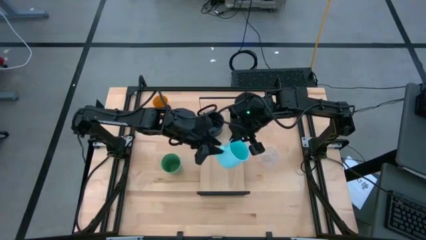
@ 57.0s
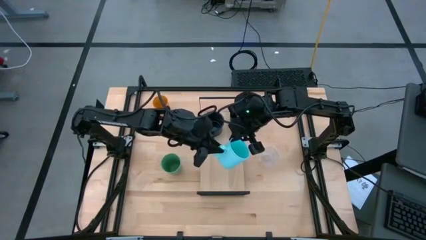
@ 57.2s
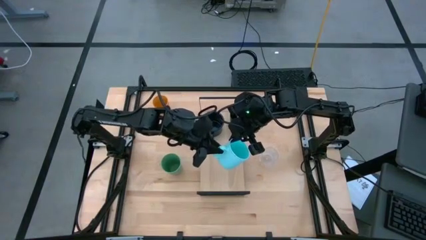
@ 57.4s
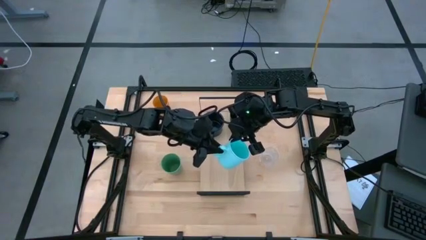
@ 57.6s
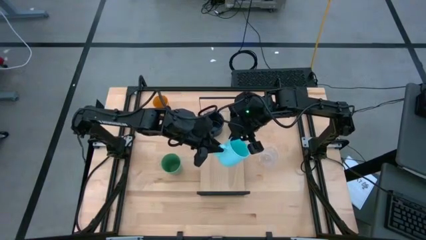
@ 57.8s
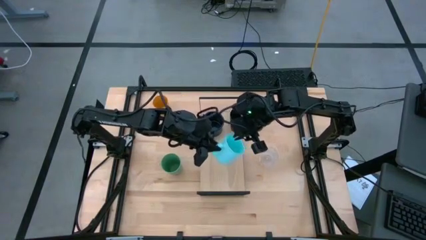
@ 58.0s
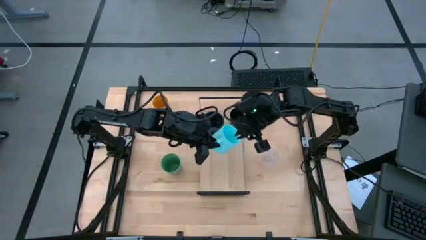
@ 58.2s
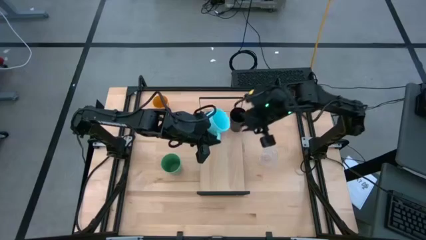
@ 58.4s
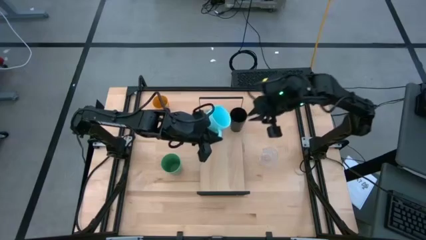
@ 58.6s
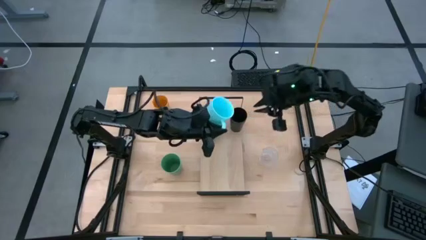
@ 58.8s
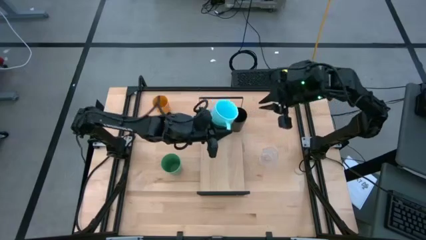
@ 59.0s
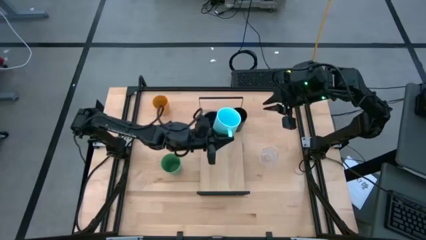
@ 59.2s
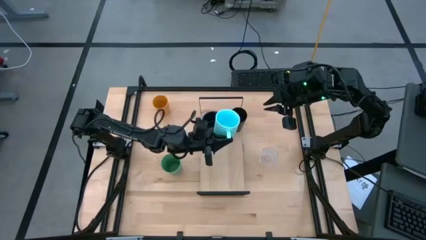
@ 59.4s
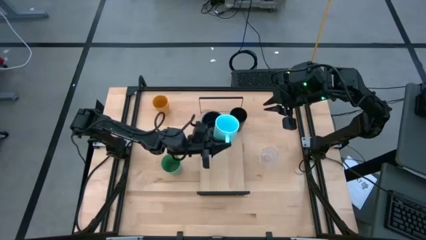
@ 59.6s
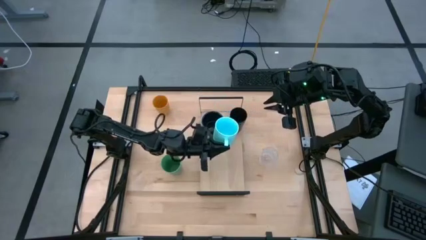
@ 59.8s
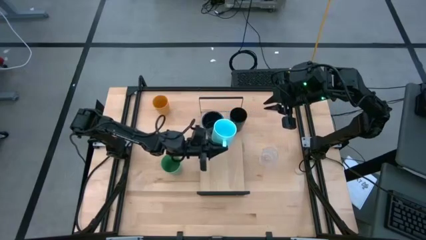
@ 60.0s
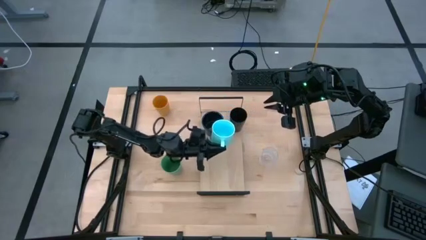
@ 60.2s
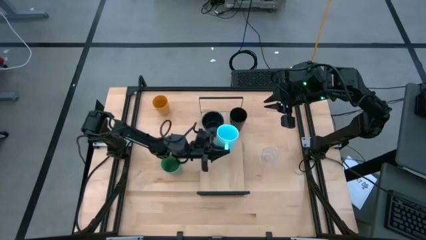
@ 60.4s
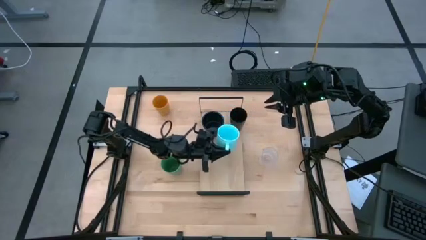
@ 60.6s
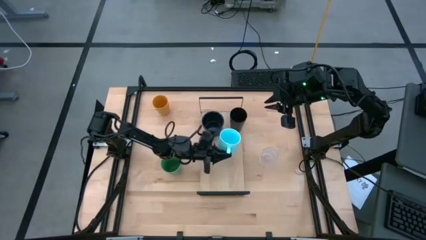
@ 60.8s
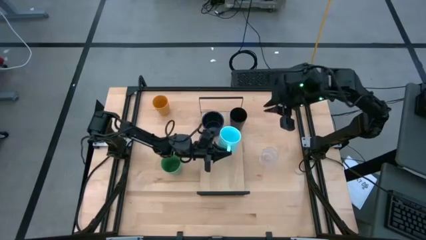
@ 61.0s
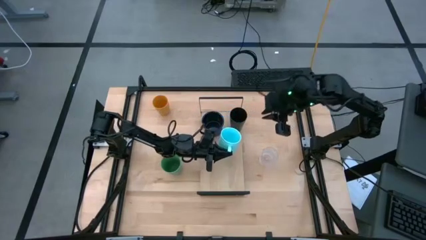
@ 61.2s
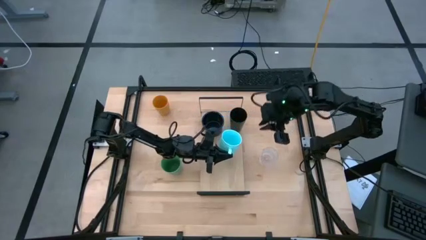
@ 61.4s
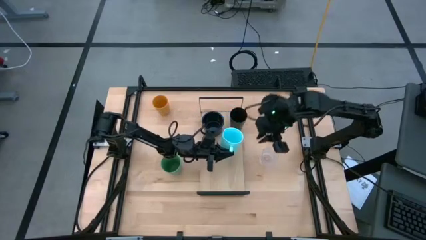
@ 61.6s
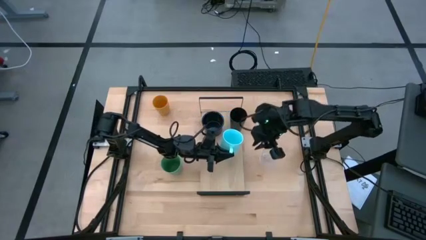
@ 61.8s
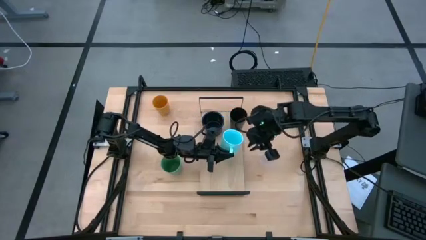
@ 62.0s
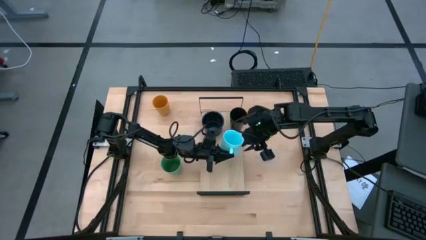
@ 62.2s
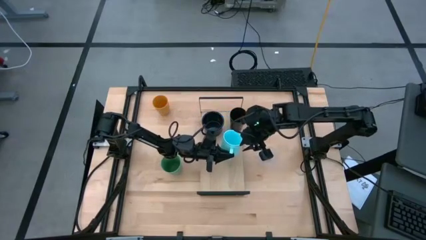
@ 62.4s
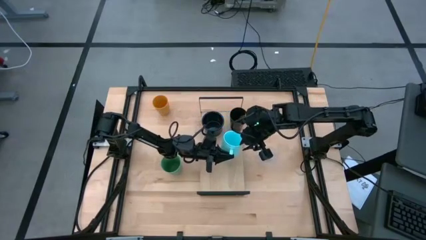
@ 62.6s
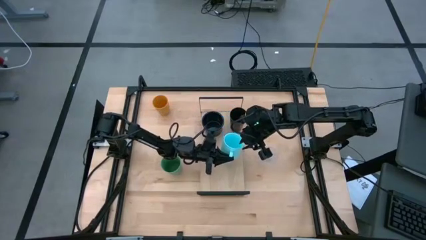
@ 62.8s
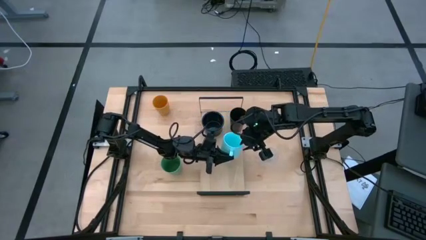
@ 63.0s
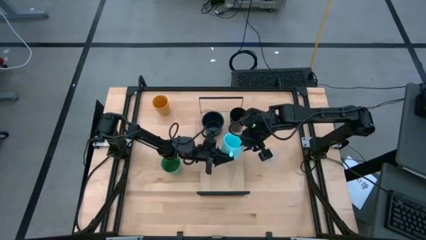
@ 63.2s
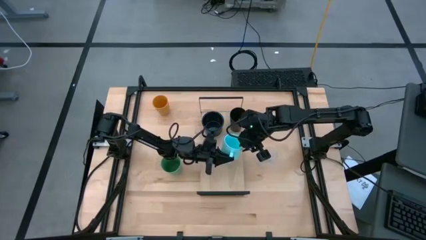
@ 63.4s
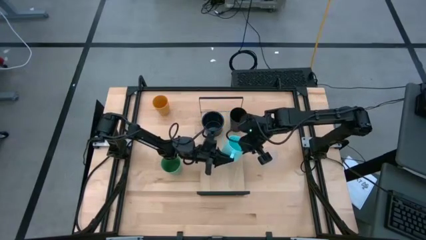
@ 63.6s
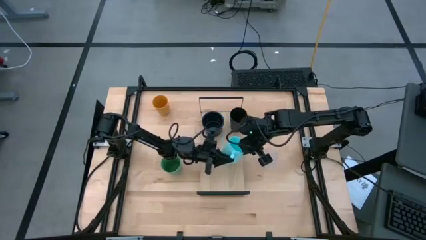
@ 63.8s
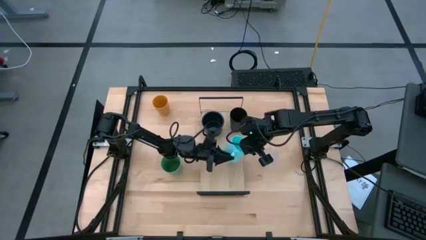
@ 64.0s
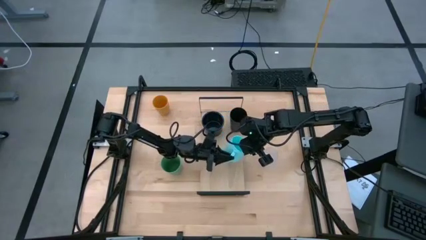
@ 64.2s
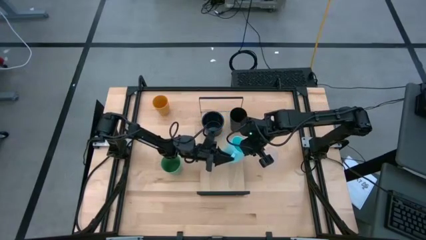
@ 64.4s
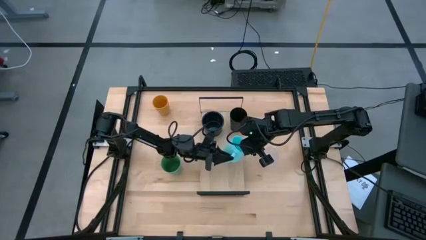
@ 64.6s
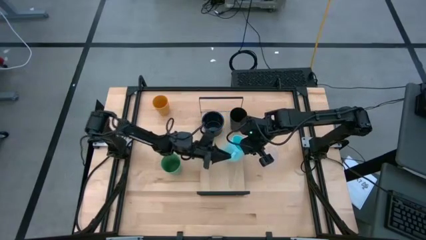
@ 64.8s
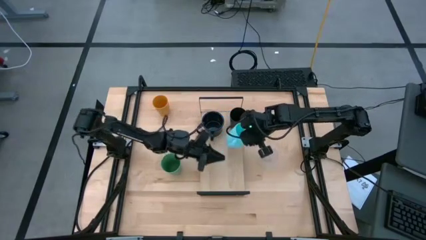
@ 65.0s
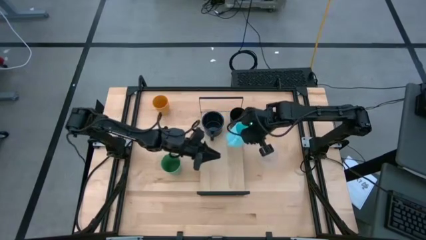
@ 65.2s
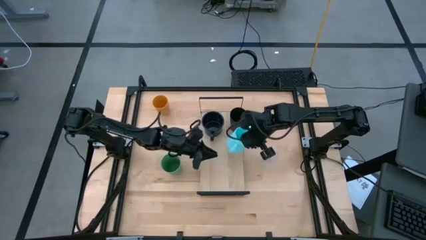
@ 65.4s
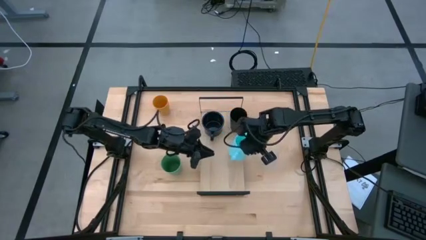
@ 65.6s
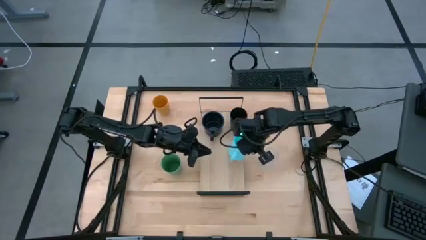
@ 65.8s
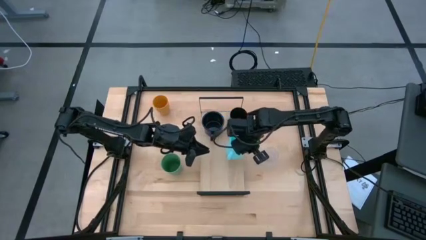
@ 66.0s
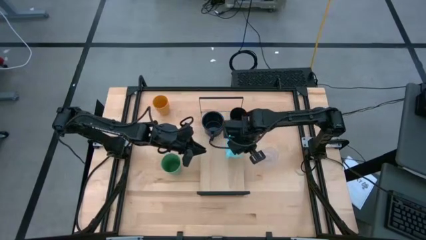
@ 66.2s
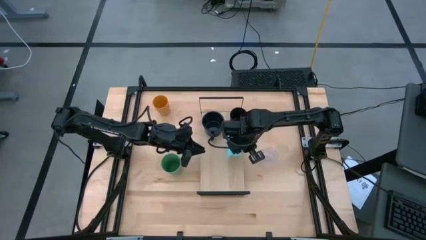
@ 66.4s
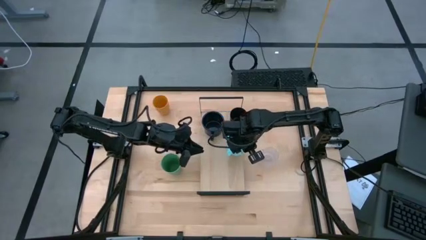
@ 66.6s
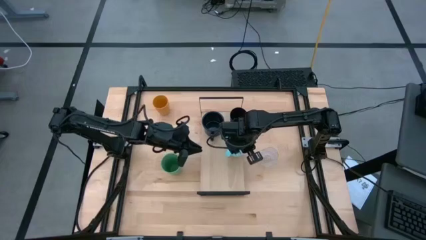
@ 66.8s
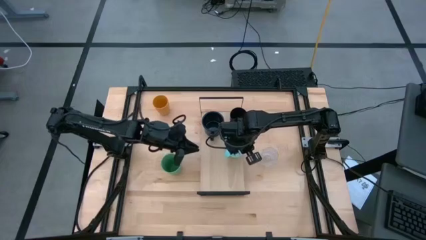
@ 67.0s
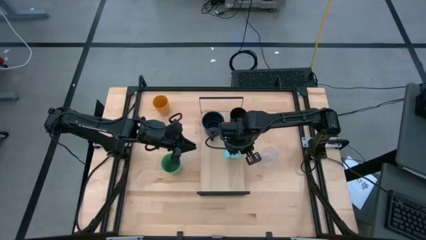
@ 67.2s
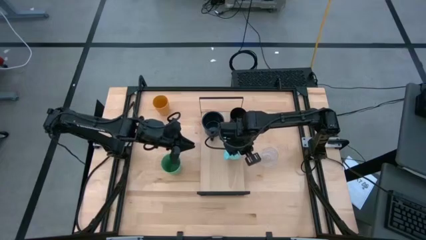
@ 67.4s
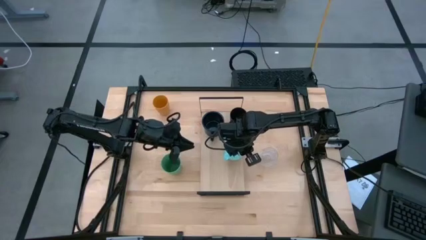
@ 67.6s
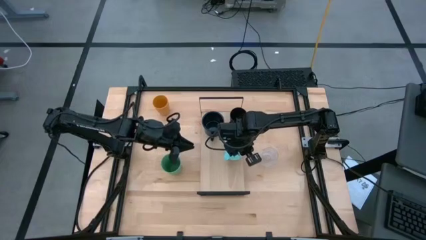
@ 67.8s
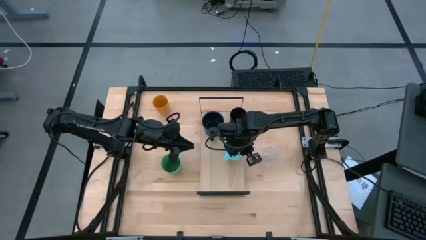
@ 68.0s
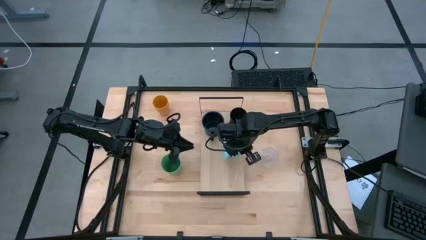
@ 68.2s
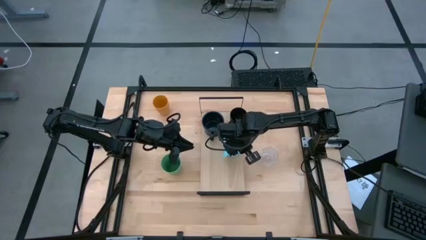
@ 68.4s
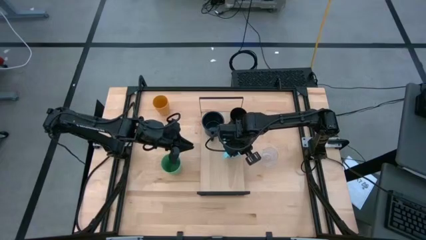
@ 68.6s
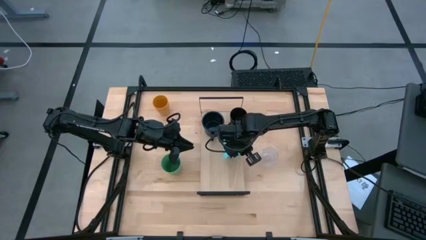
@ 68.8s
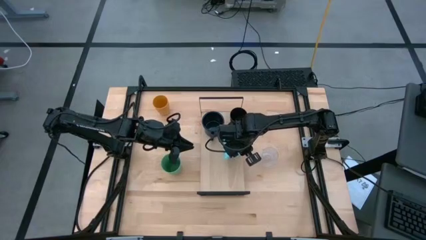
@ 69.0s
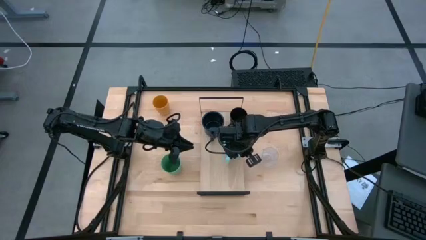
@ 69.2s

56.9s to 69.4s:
Task: Stack small to large cups/mugs on shelf
Put the light blue mug on the shelf
